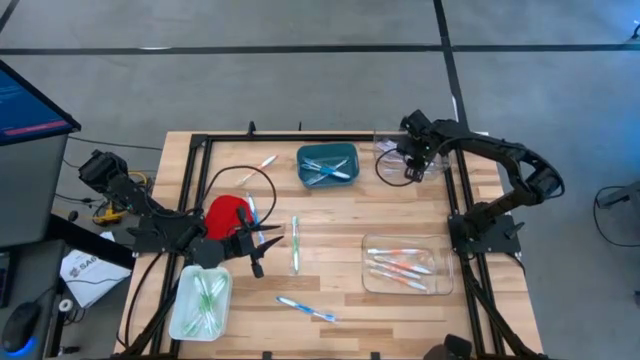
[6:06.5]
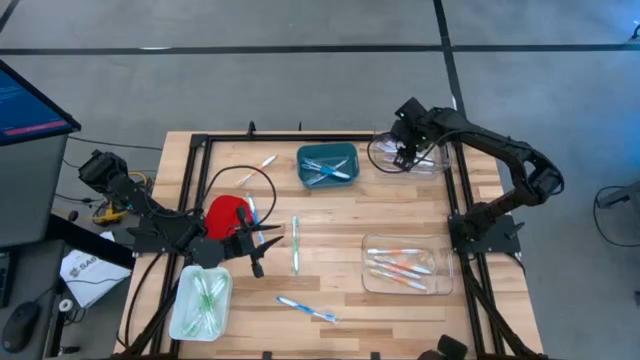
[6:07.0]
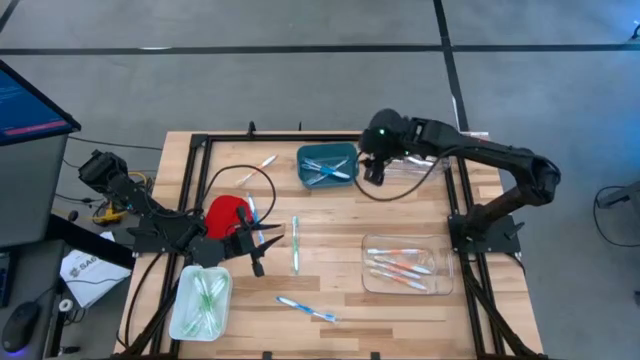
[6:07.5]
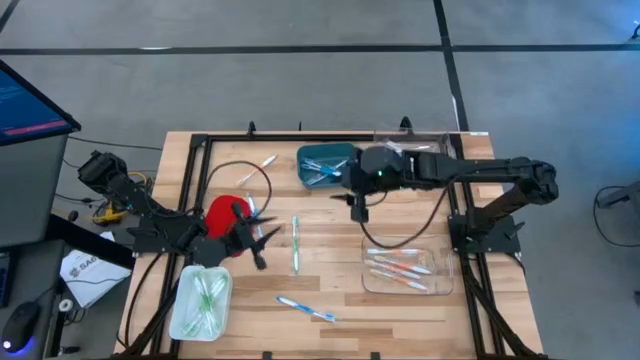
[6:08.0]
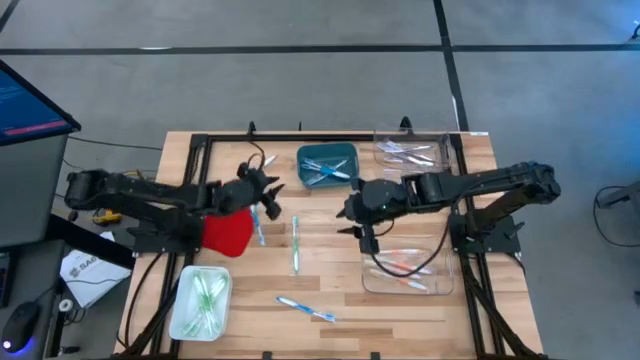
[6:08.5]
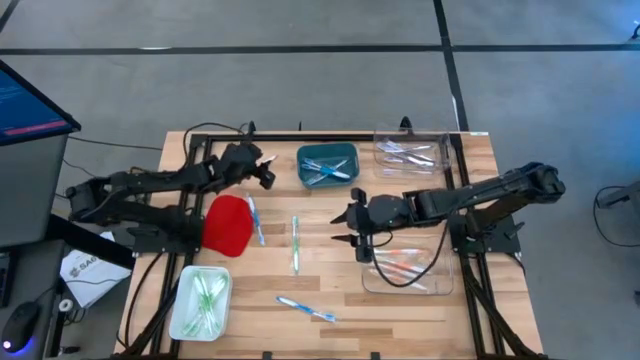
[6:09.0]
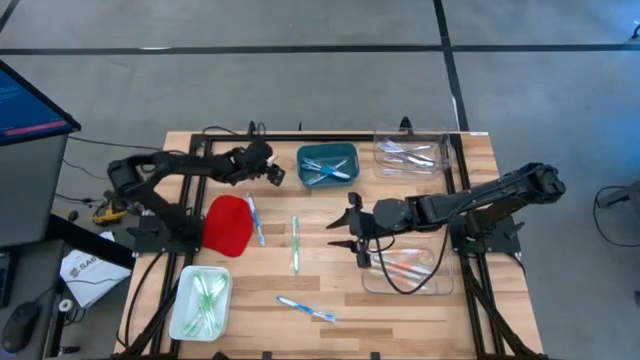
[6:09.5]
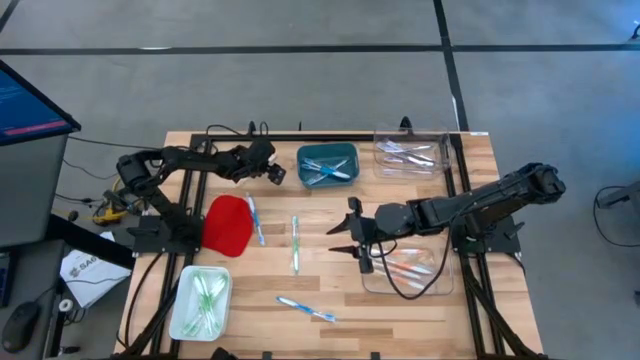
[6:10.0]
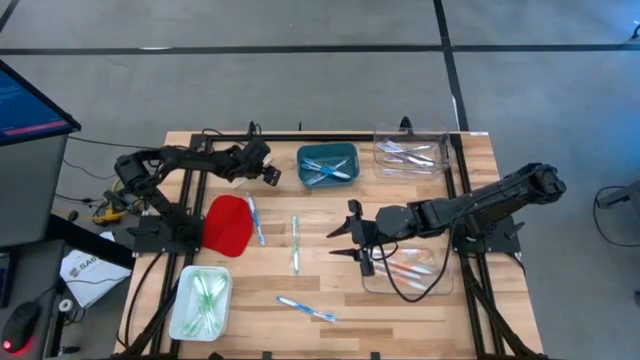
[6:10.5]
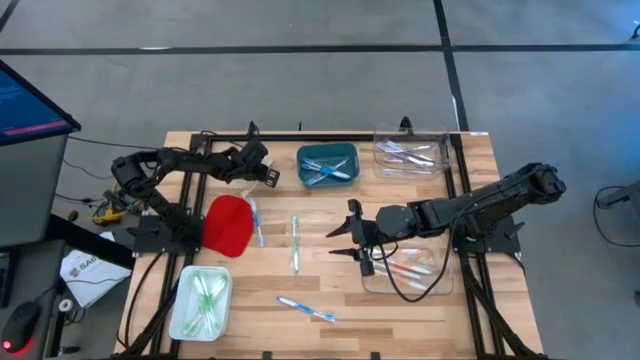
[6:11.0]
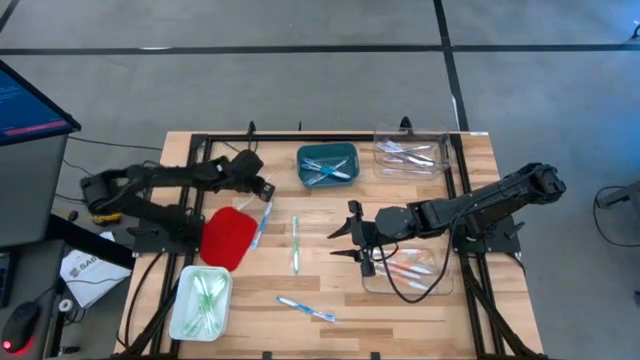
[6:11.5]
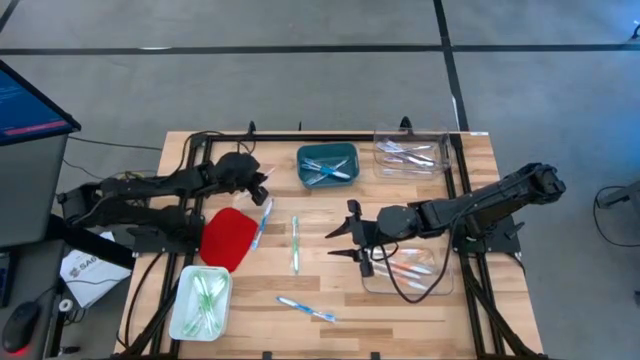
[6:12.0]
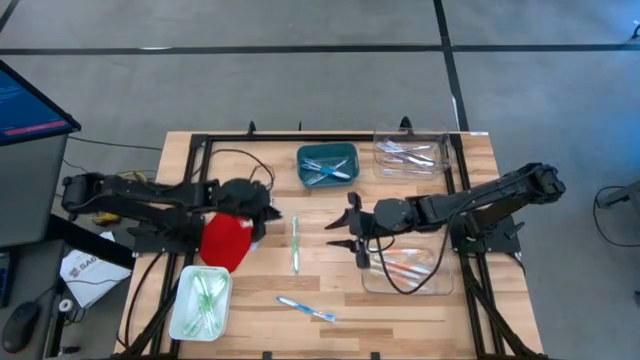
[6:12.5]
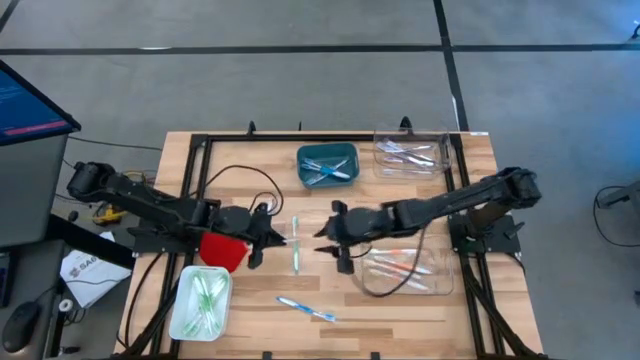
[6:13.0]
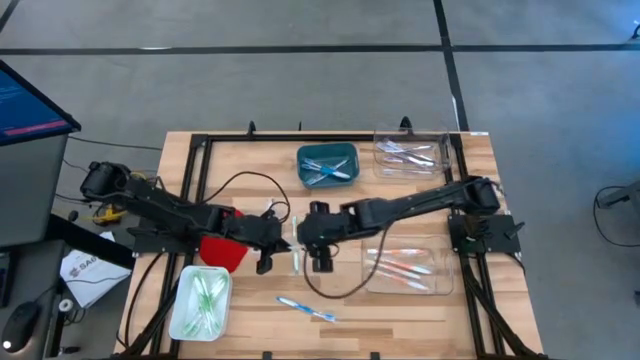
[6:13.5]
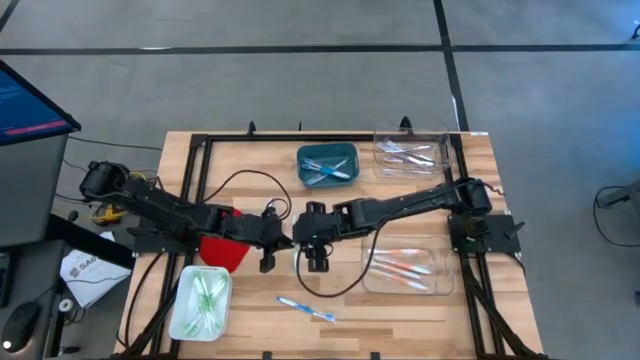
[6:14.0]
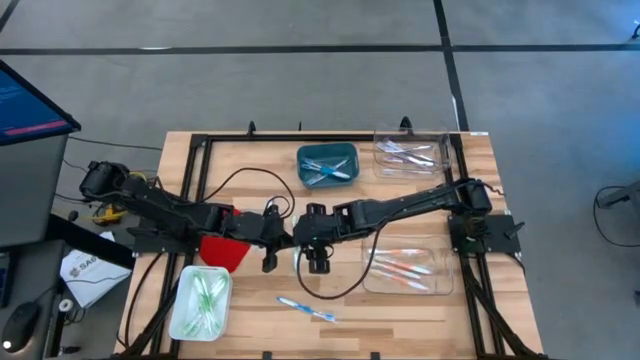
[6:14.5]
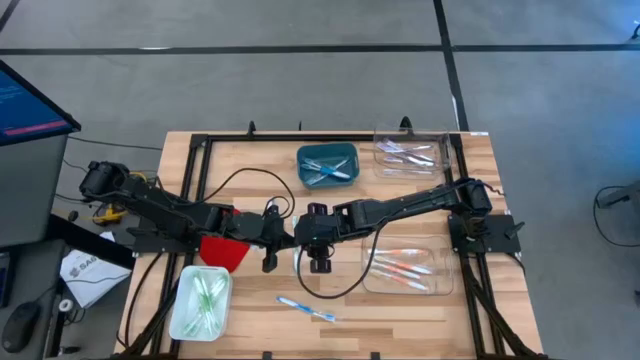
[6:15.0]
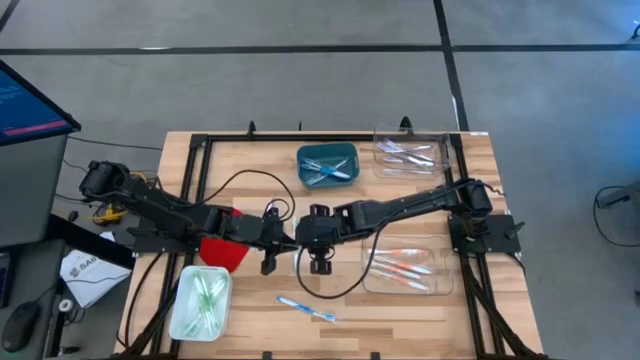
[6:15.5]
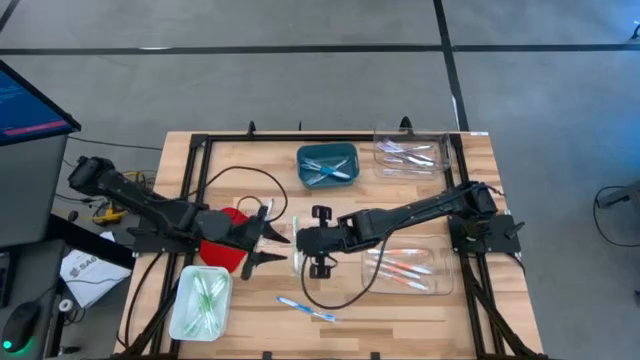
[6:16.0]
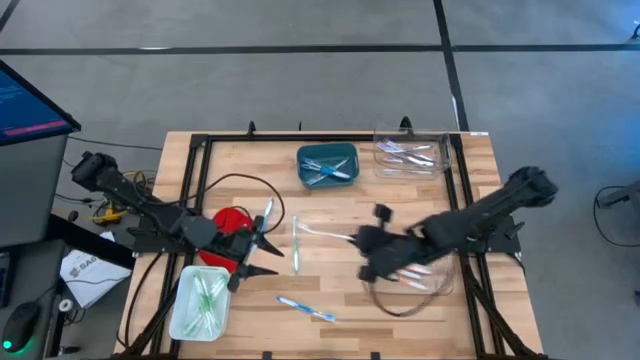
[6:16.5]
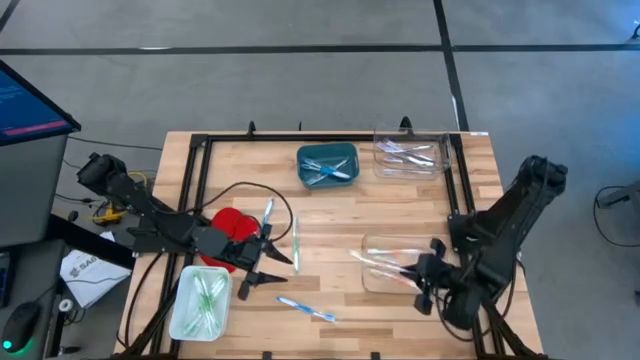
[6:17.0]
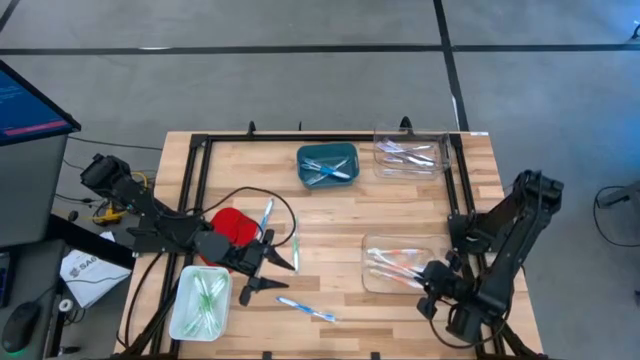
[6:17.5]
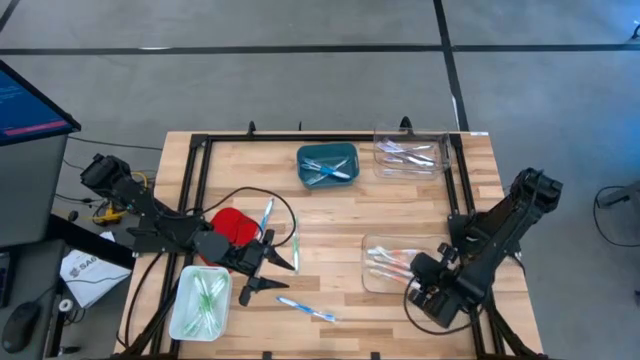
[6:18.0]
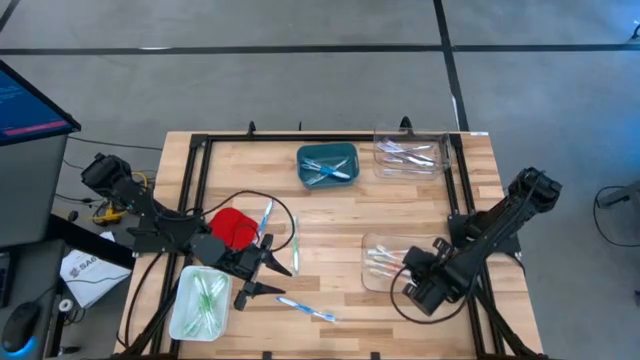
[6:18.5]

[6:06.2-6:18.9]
Task: Pick & Place Toothbrushes
Put the orange toothbrush into the bottom transparent bin

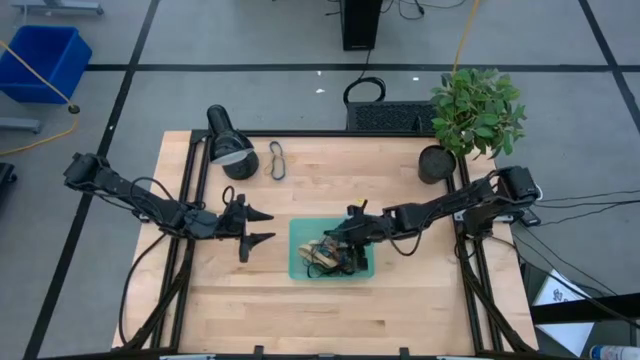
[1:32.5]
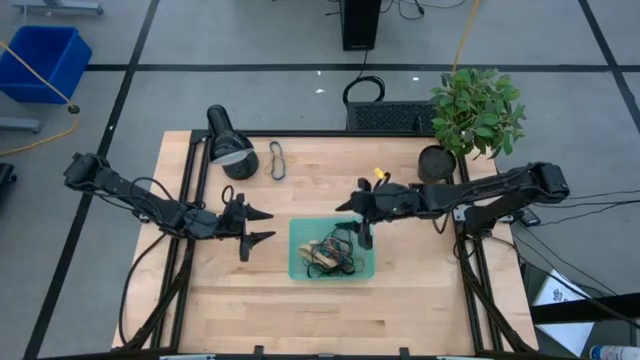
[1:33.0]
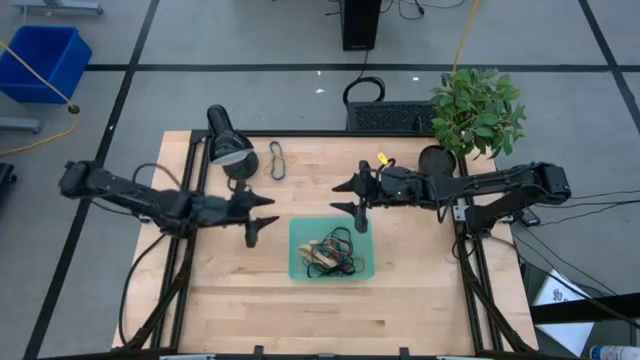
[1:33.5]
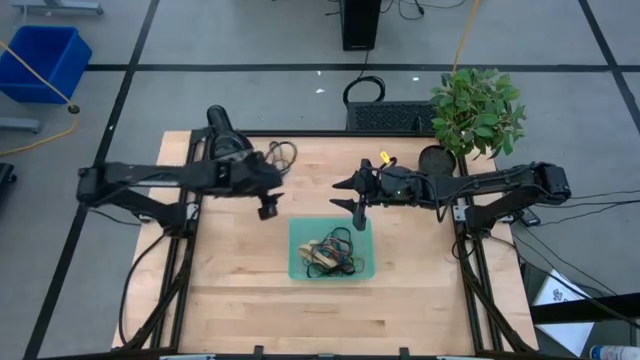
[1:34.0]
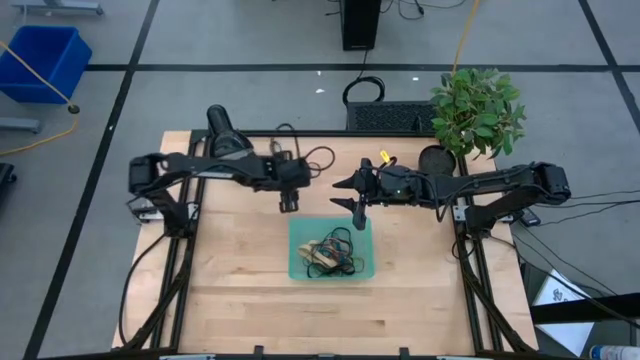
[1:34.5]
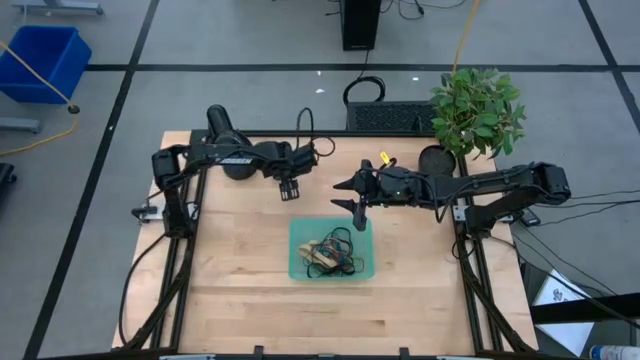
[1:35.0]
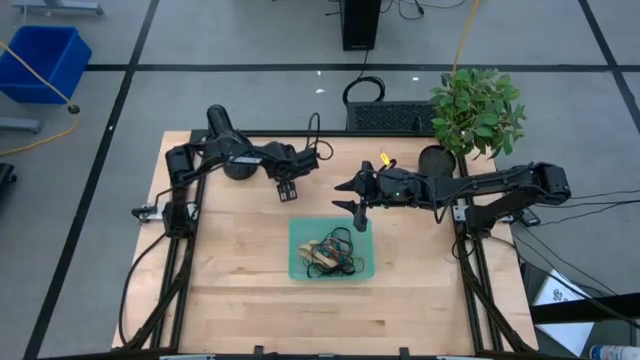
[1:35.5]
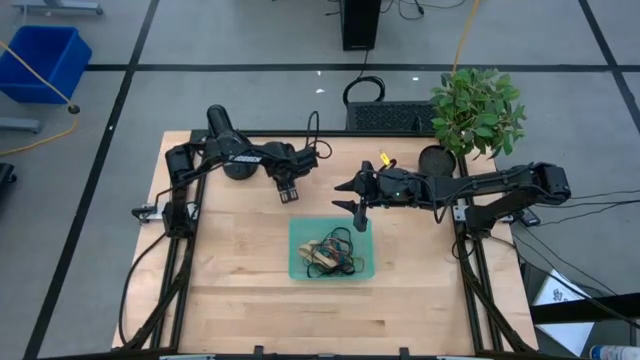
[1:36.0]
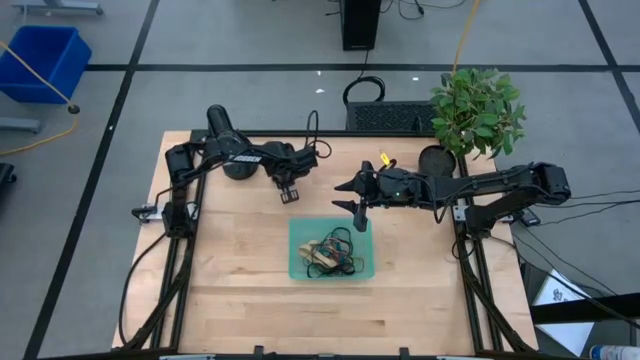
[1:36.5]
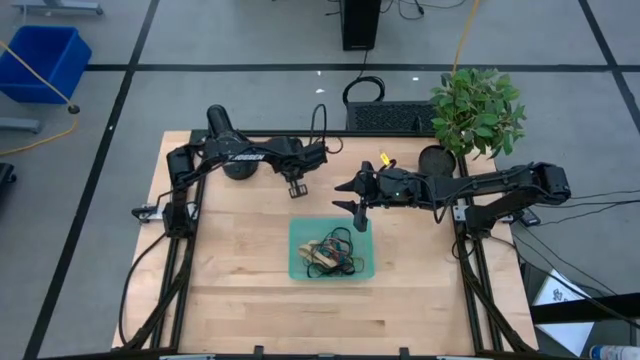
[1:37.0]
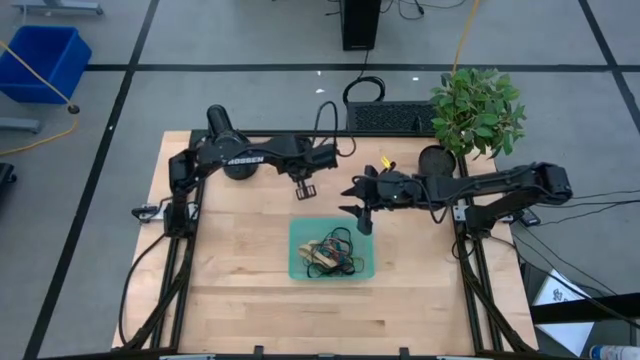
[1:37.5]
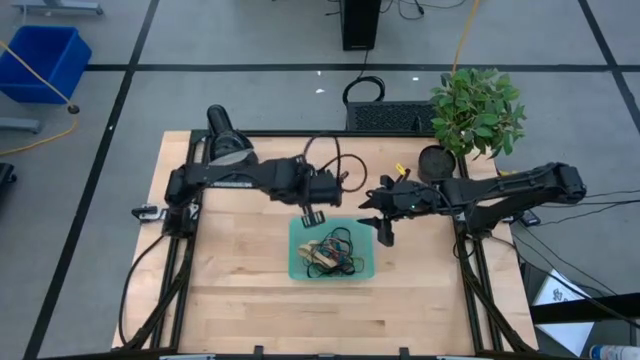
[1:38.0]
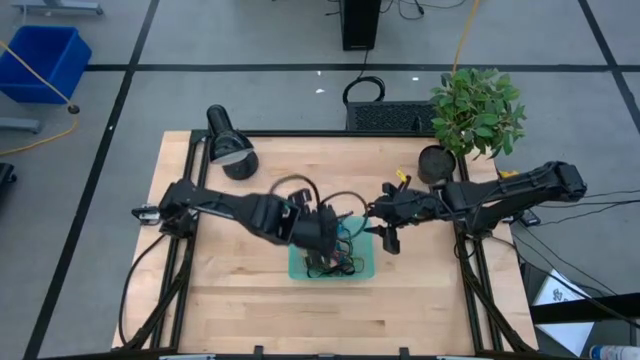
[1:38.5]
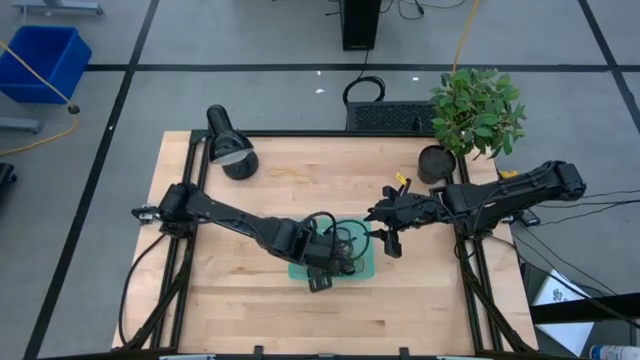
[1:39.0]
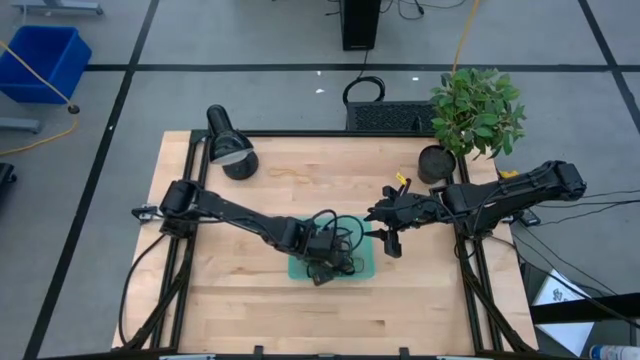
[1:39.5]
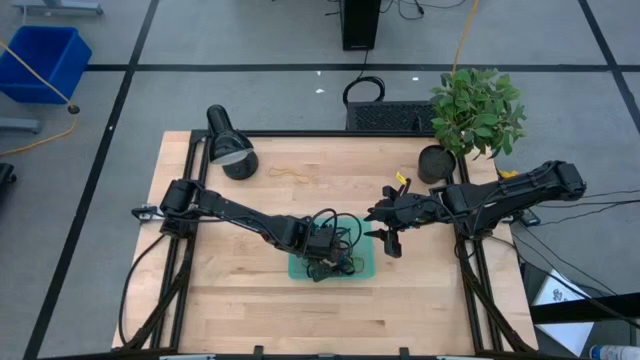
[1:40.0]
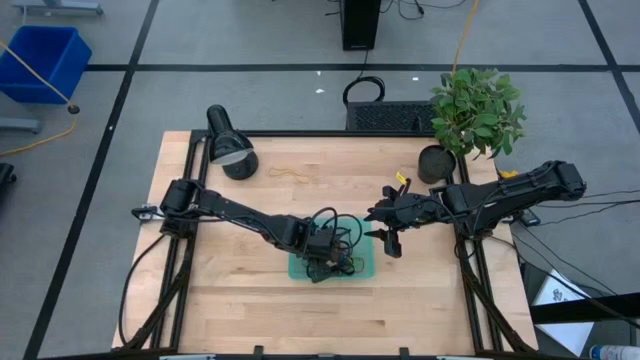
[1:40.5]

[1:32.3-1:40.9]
Task: Pick and place rubber bands into bin
Put the blue rubber band into the green bin

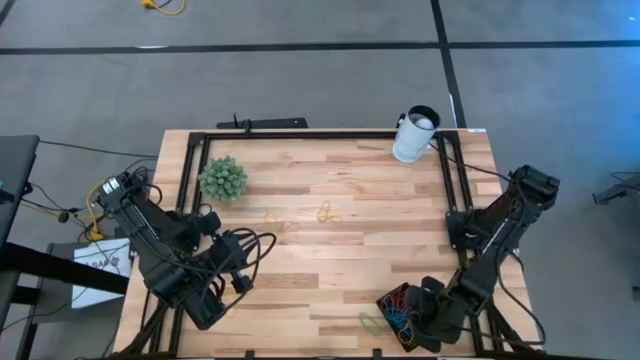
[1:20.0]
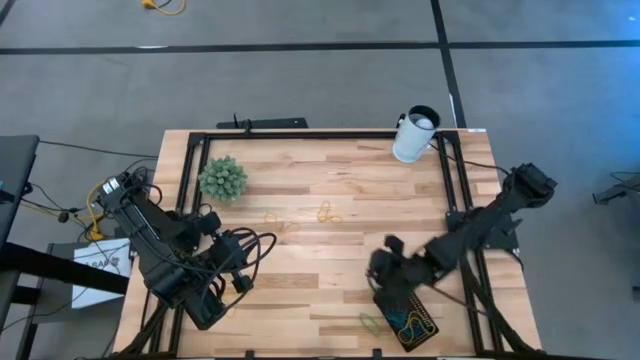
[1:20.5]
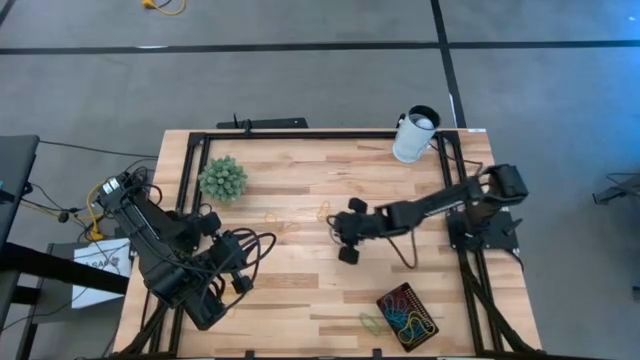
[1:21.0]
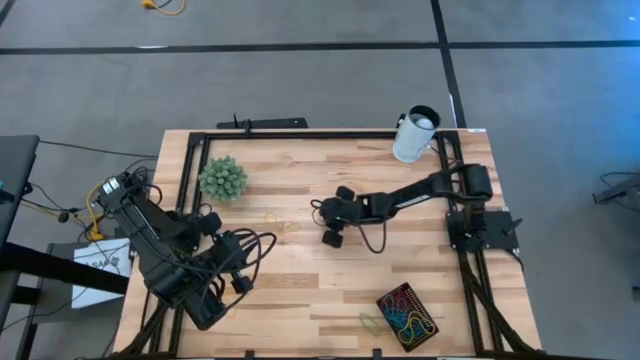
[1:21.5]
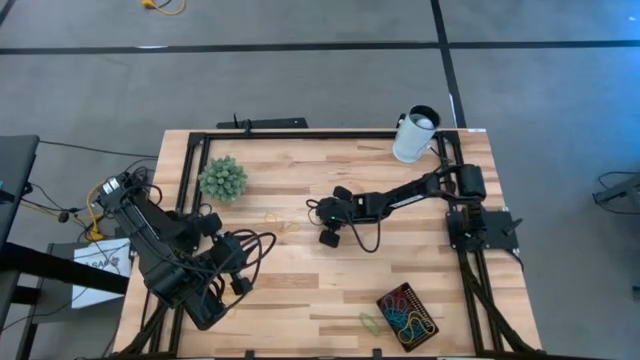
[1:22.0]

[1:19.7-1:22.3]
Task: Pick and place rubber bands into bin
Put the yellow rubber band into the black basket
